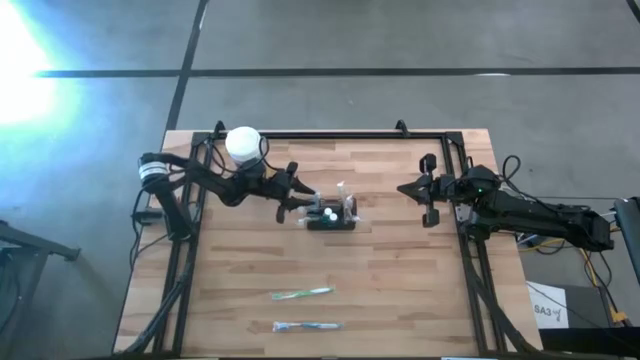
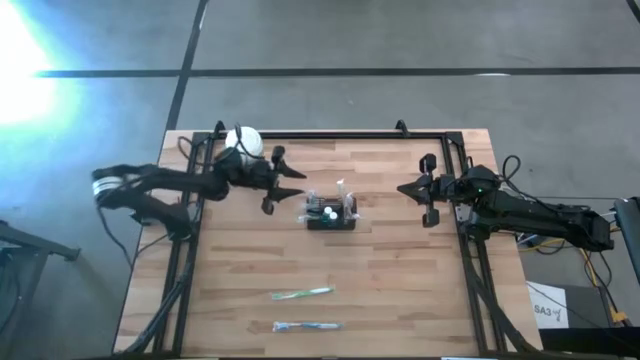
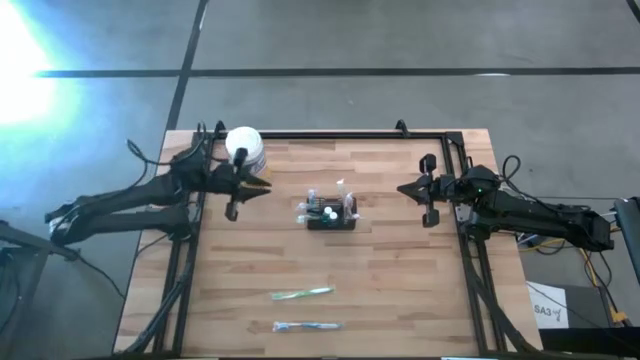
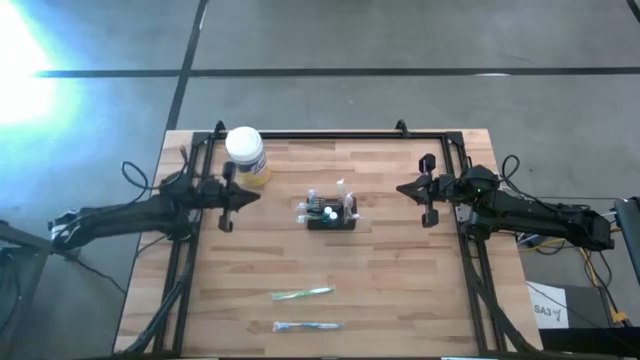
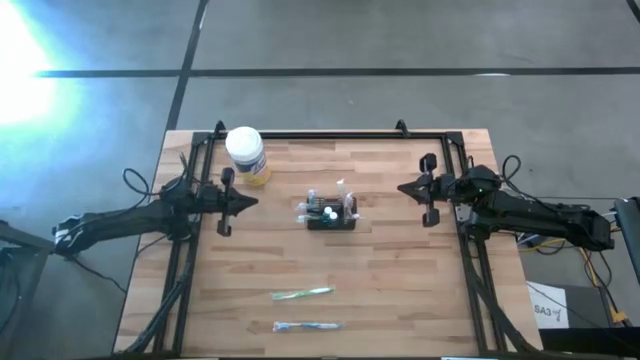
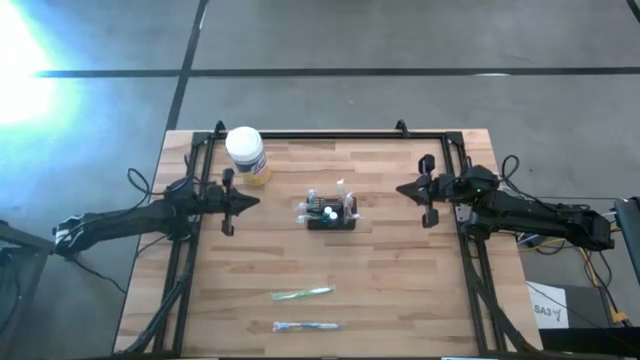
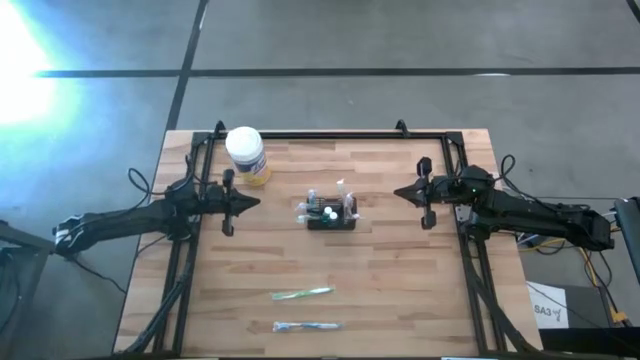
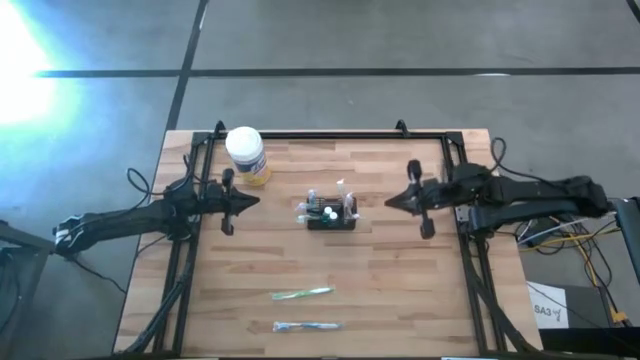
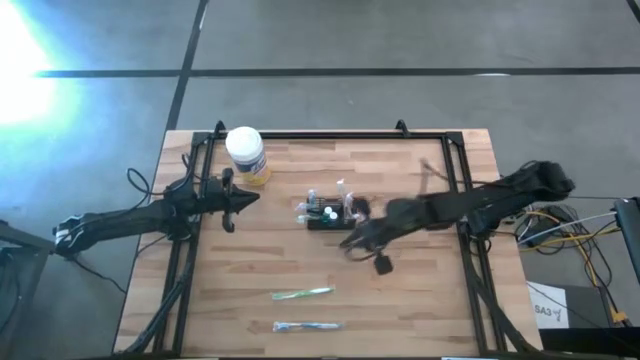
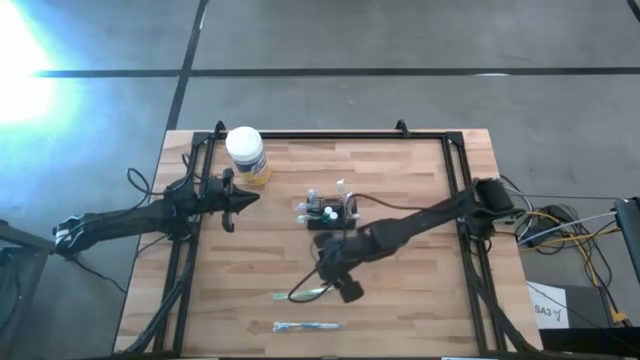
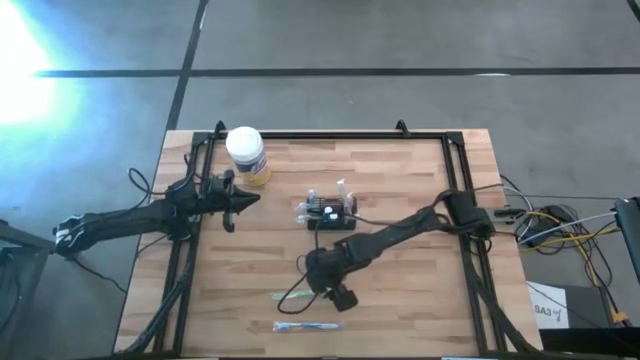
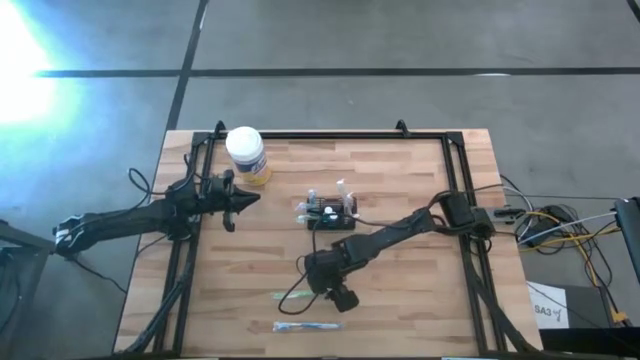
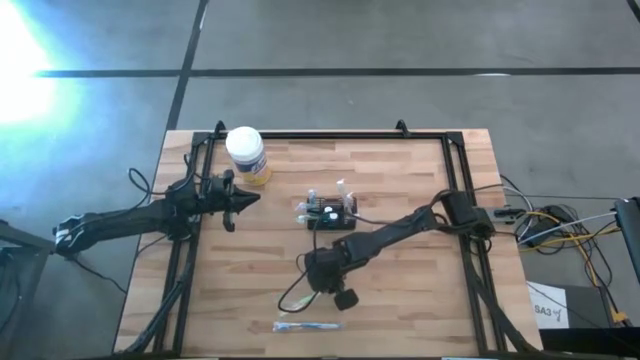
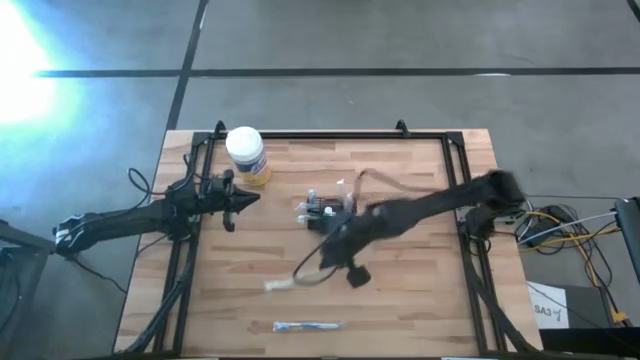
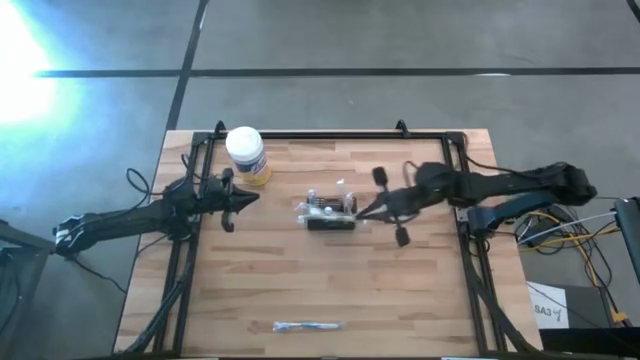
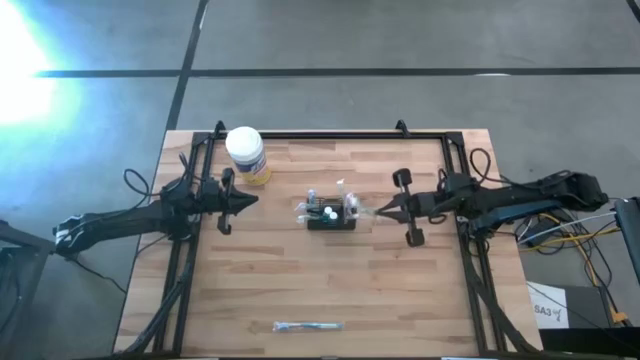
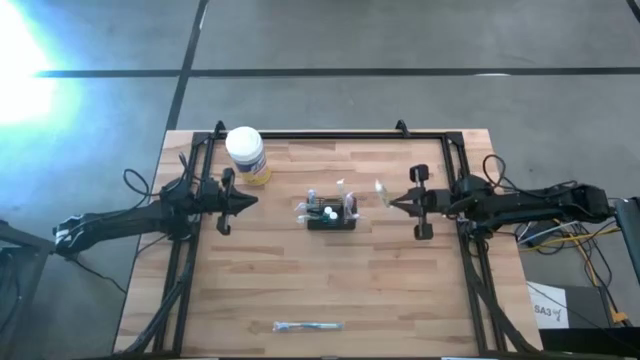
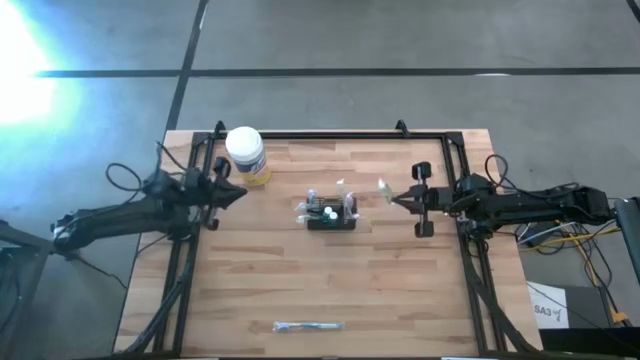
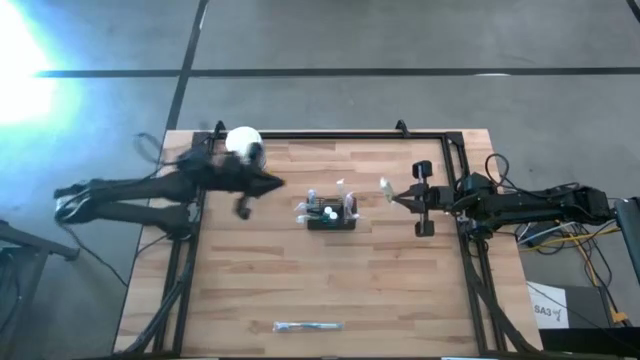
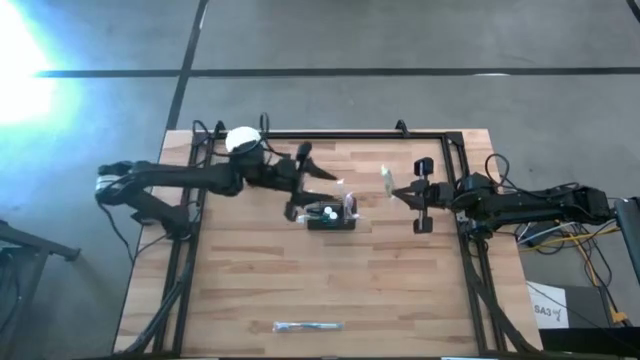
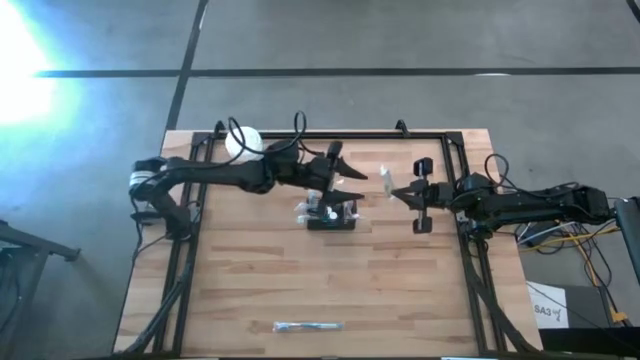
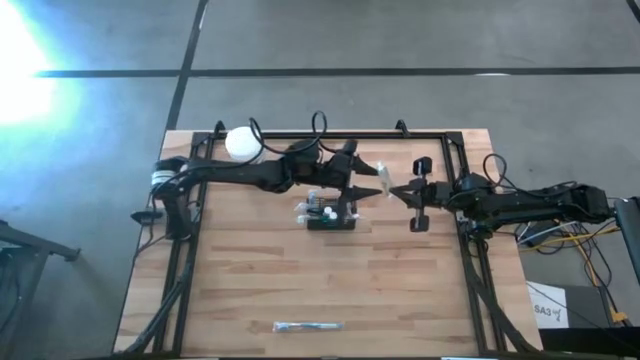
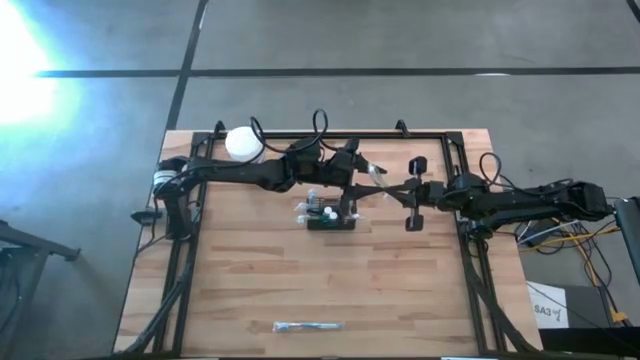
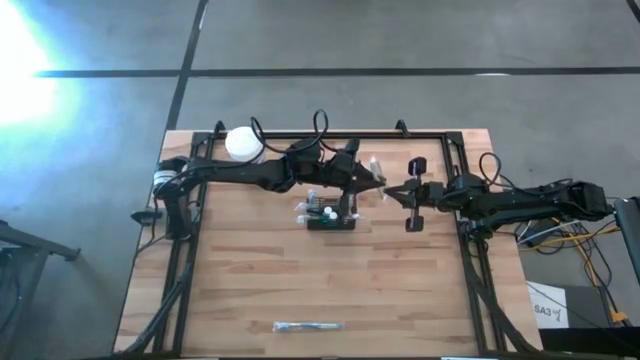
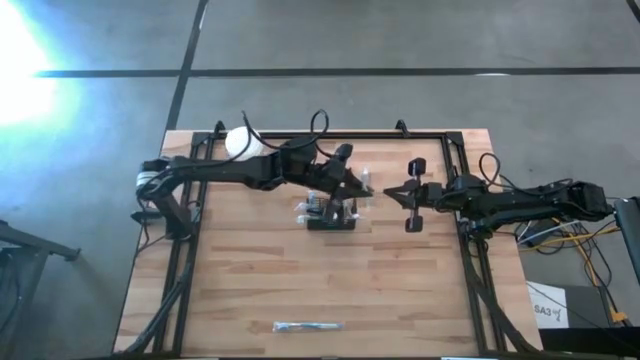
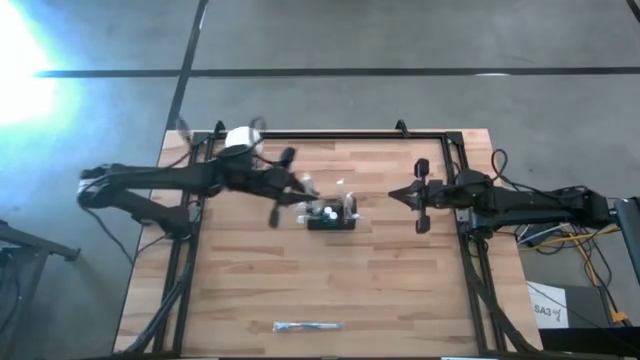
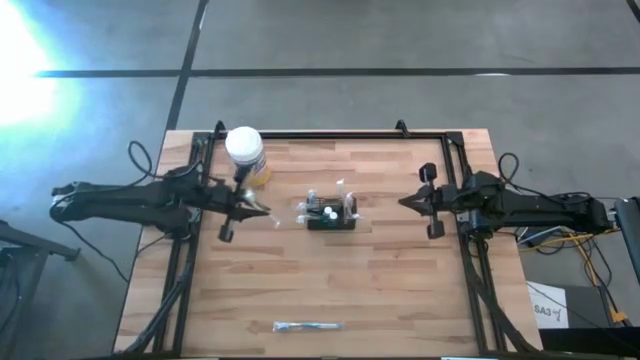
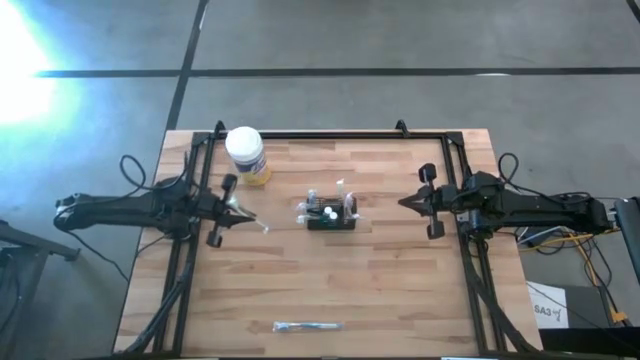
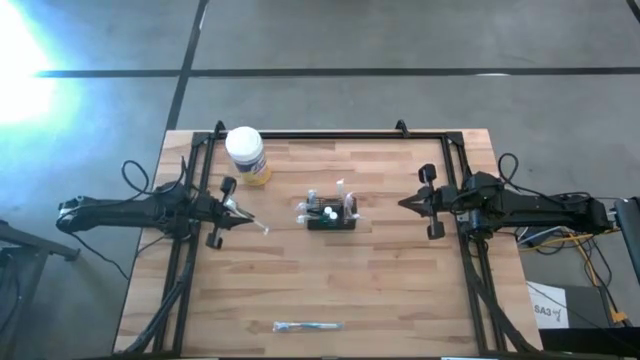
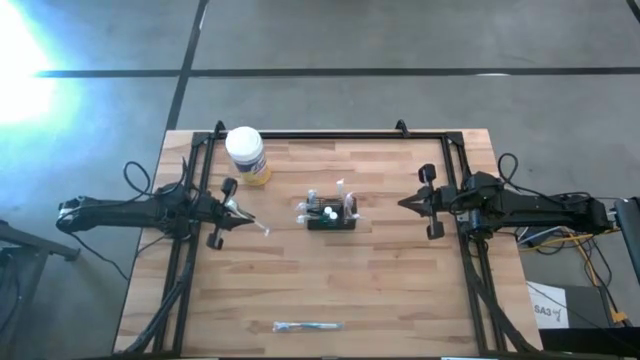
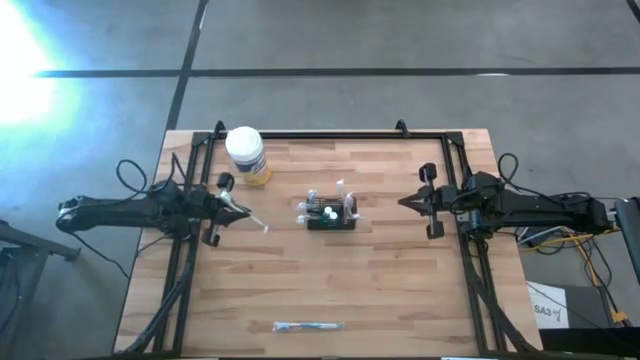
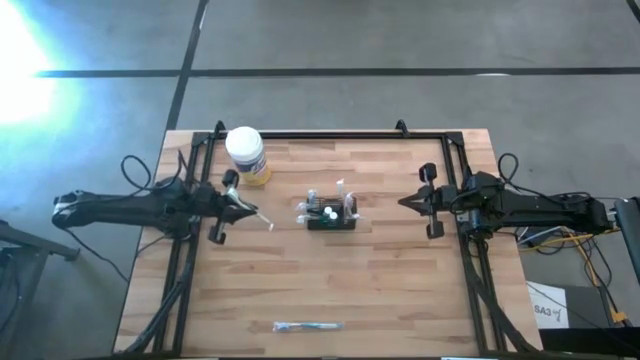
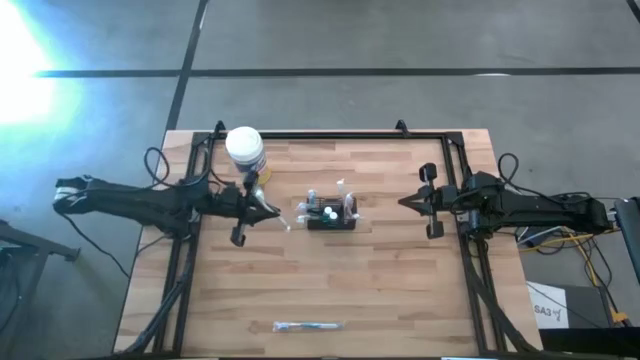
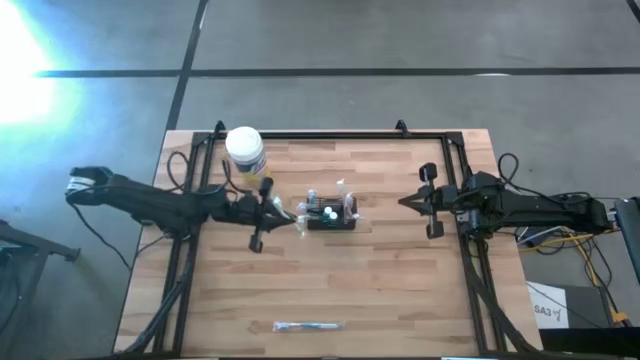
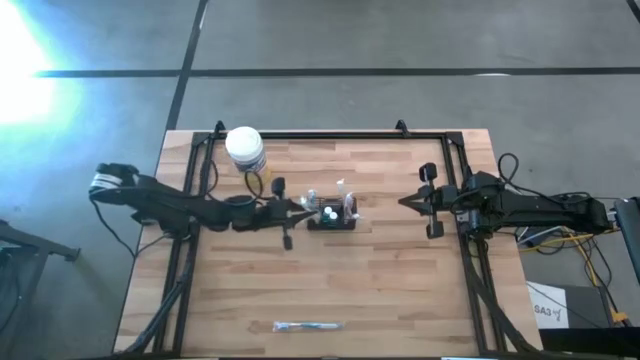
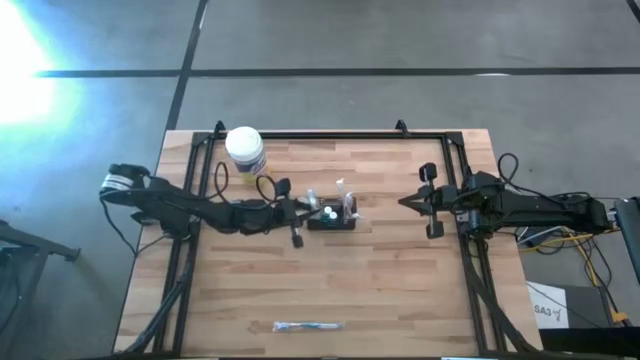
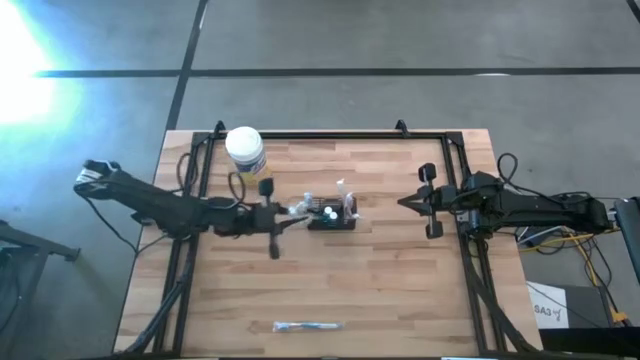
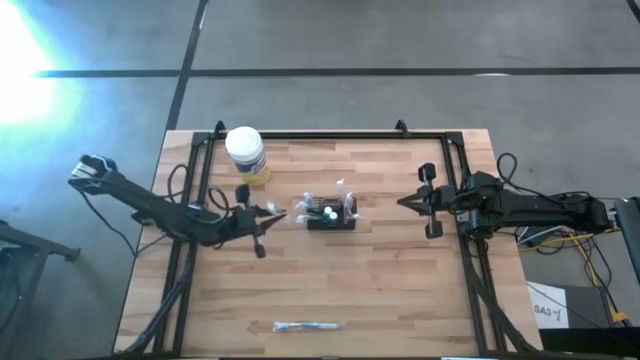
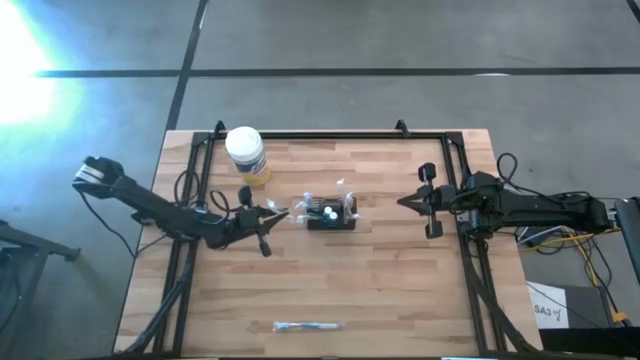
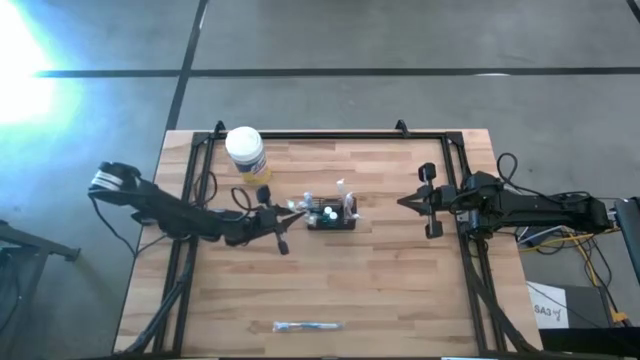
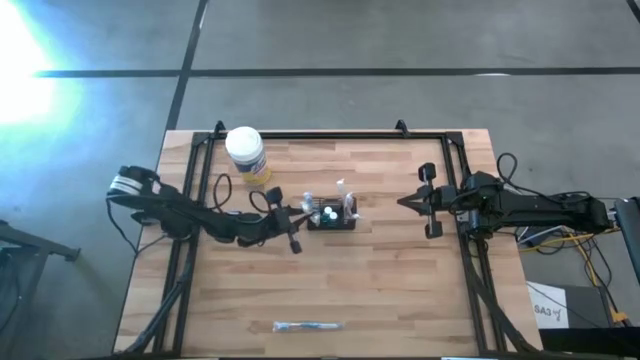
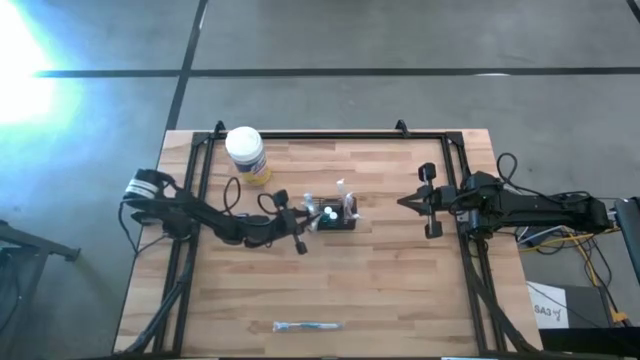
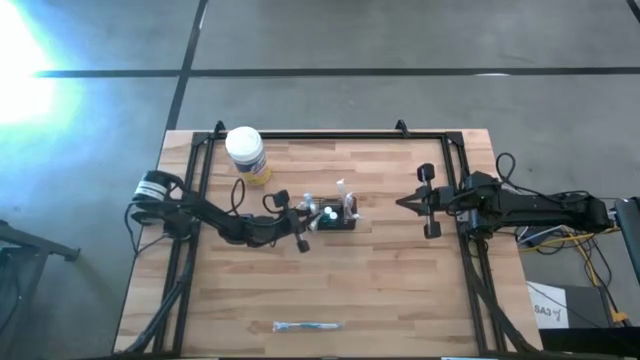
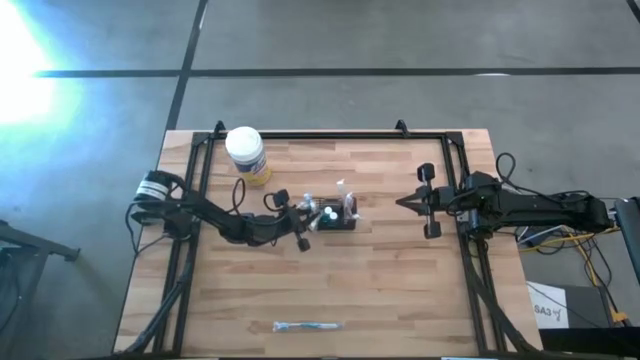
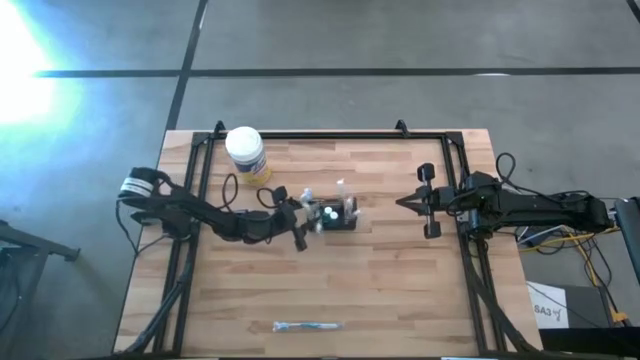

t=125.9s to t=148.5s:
Task: Pick & Place toothbrushing station
Put the green toothbrush into the black wire organizer
